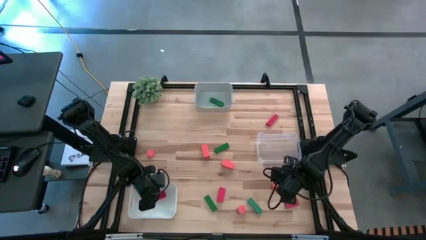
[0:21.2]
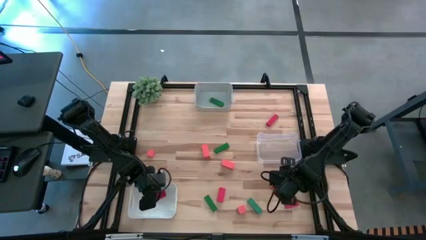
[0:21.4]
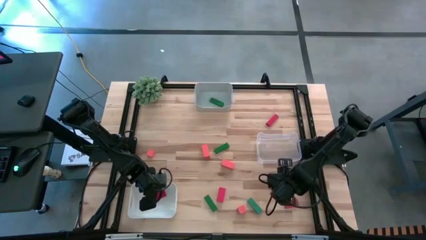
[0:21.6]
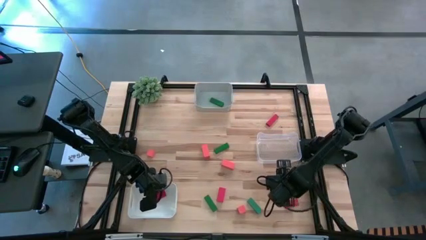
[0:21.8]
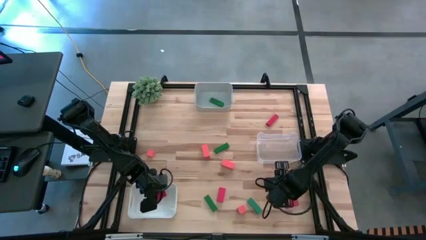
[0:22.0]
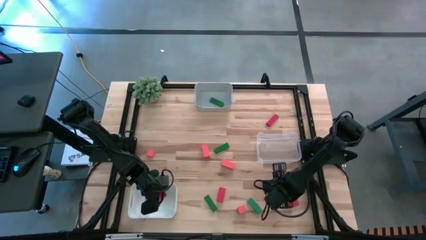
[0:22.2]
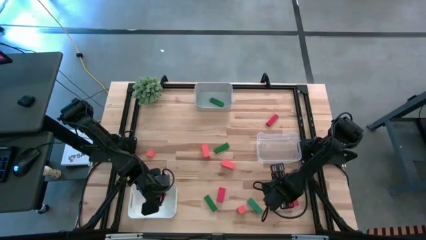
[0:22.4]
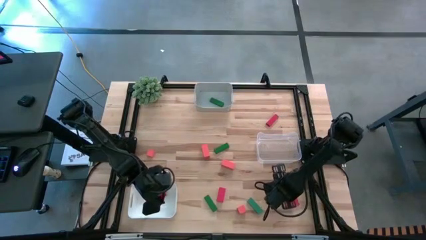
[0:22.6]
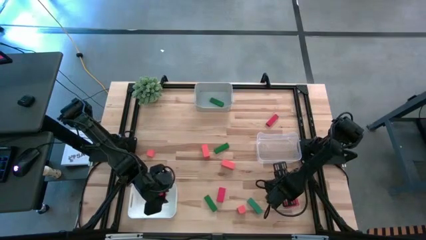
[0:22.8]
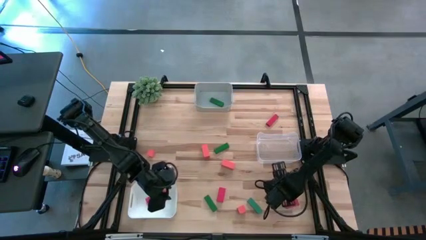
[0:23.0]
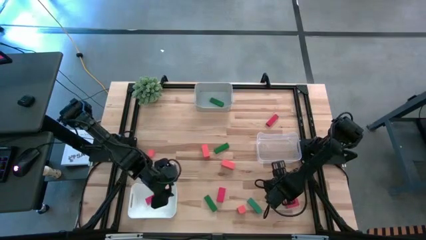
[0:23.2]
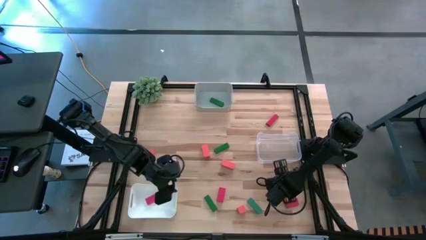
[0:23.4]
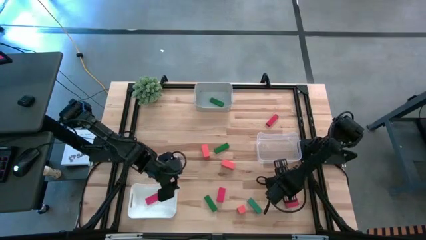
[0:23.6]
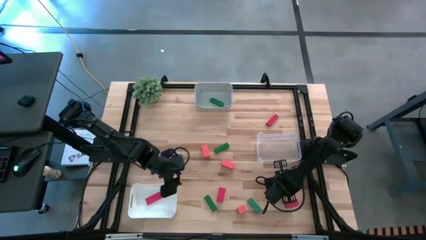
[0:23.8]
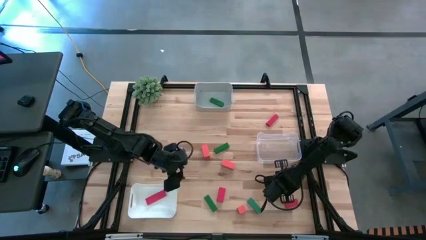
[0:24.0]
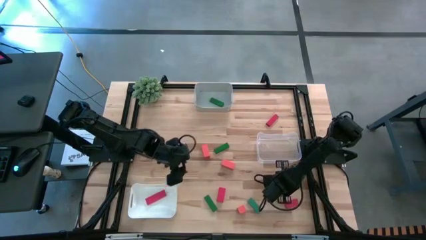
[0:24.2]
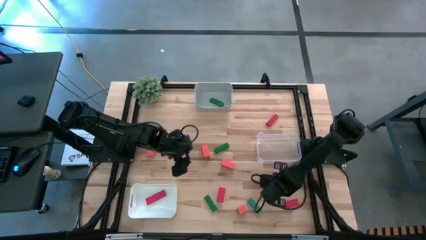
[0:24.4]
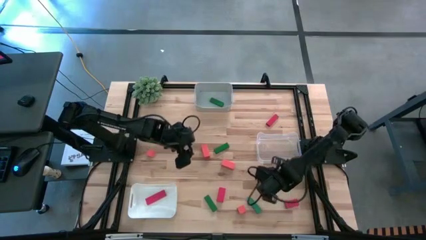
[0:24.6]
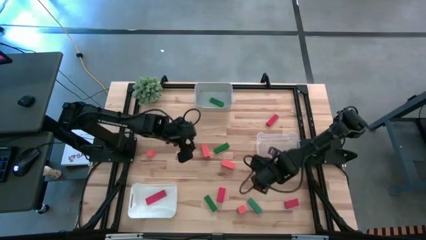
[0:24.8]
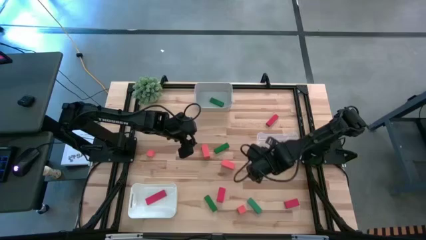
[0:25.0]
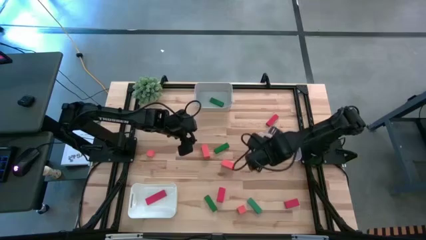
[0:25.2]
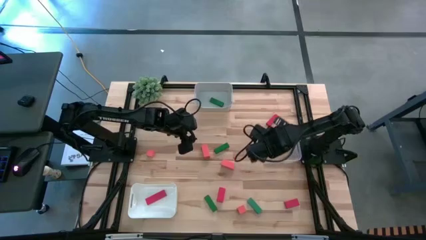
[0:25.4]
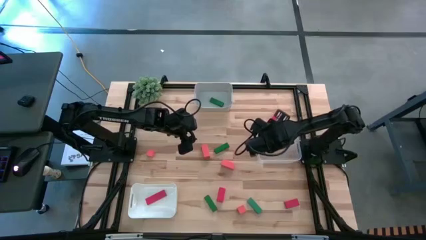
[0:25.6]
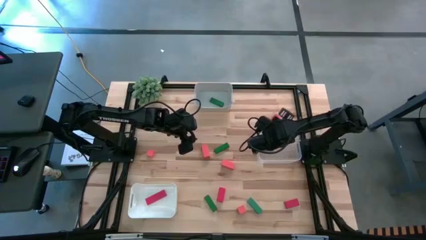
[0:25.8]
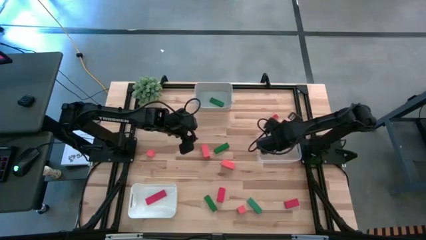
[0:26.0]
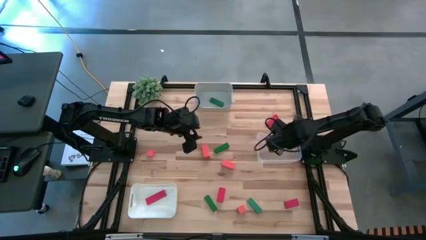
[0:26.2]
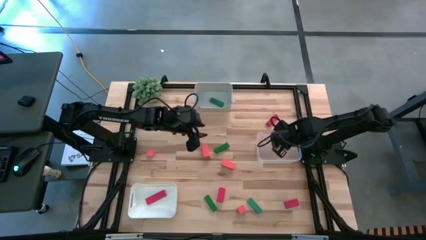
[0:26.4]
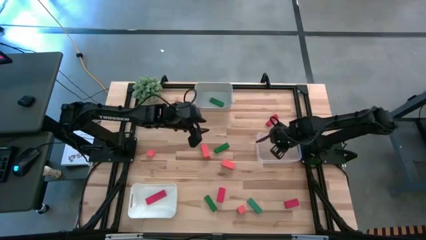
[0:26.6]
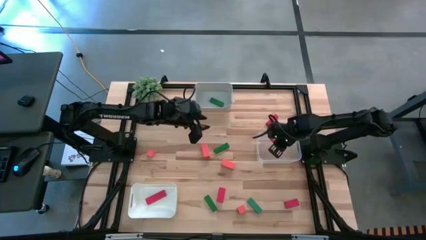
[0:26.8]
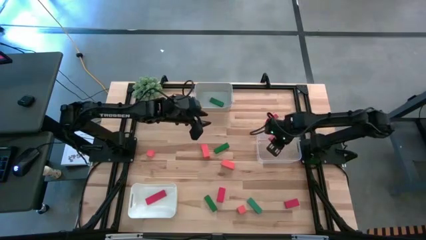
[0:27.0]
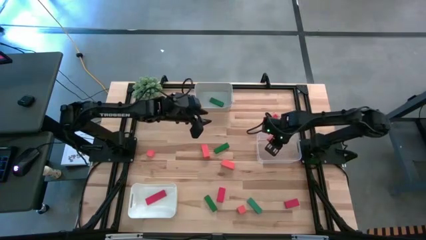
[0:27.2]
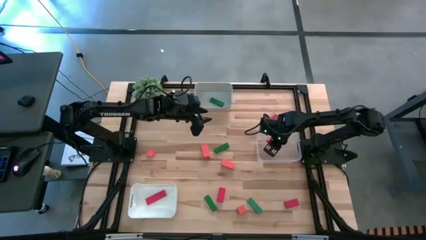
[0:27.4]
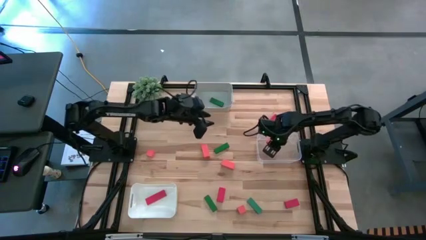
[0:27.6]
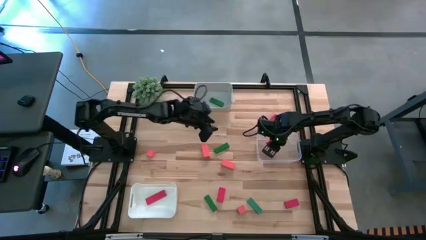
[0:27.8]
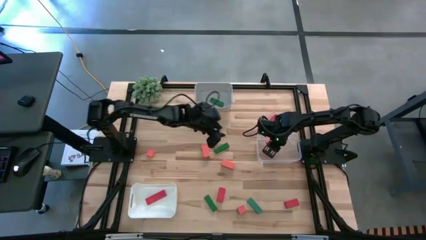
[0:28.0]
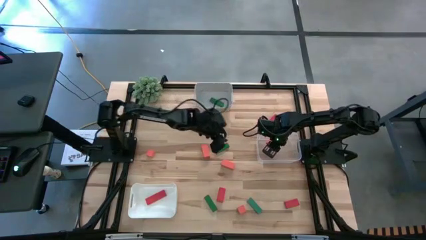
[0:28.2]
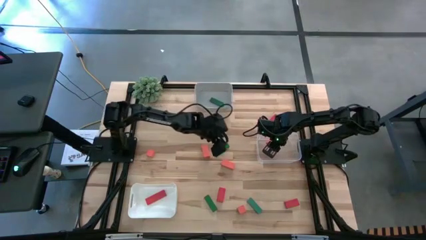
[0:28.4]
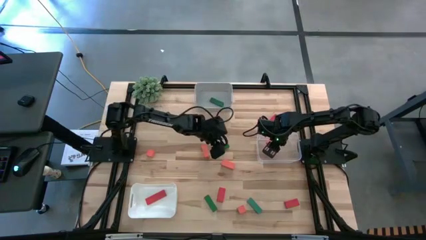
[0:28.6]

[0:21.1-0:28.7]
Task: Sort & place blocks by color
Put the orange block into the transparent bin

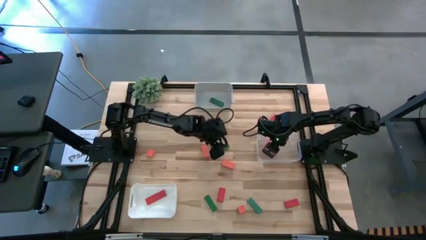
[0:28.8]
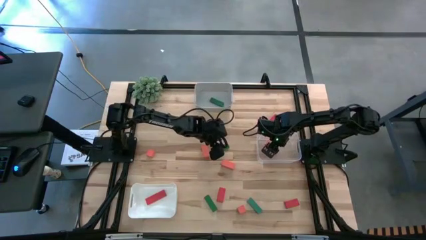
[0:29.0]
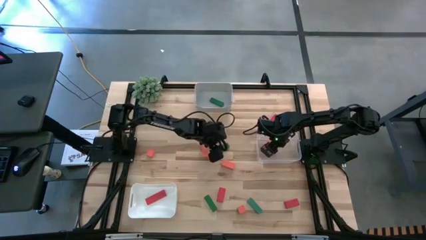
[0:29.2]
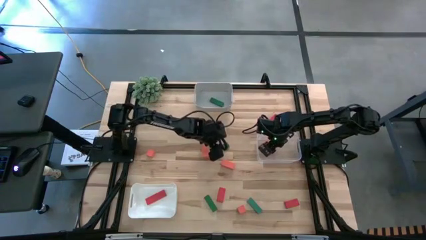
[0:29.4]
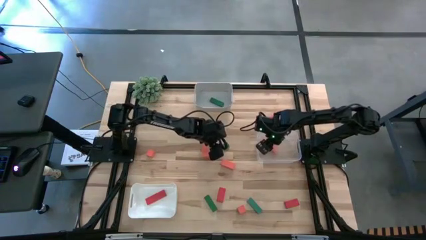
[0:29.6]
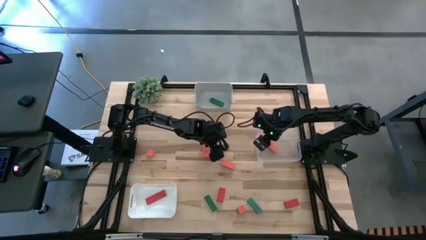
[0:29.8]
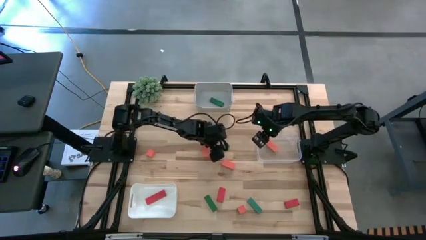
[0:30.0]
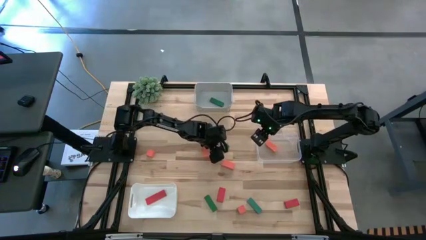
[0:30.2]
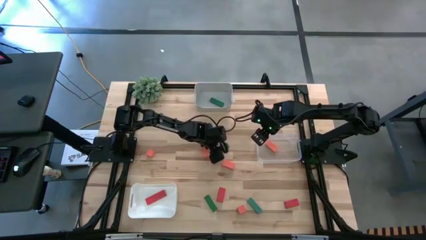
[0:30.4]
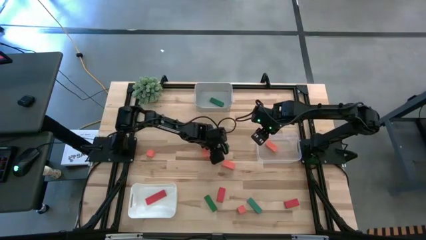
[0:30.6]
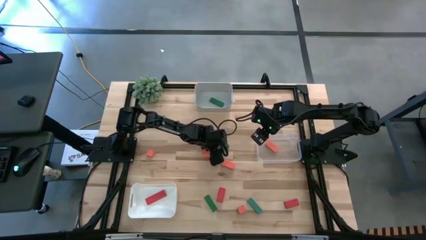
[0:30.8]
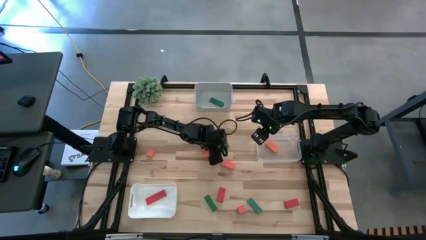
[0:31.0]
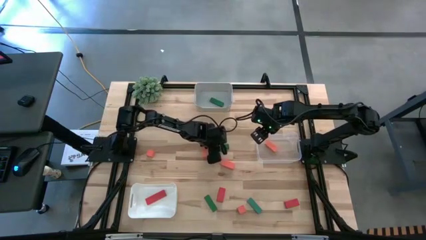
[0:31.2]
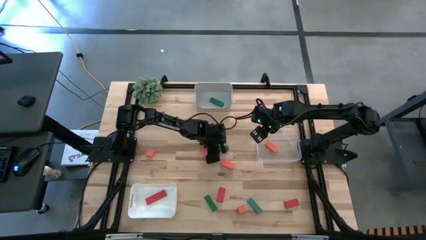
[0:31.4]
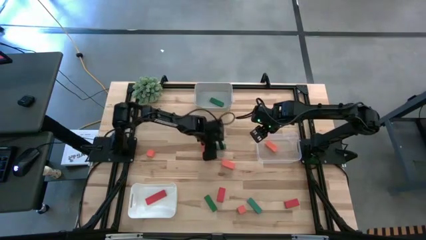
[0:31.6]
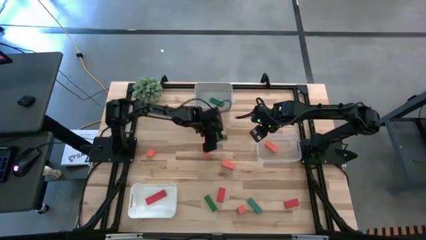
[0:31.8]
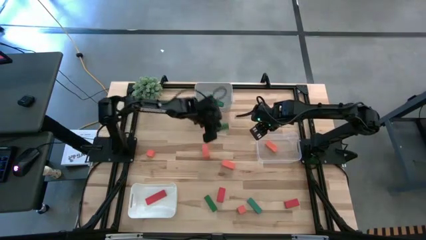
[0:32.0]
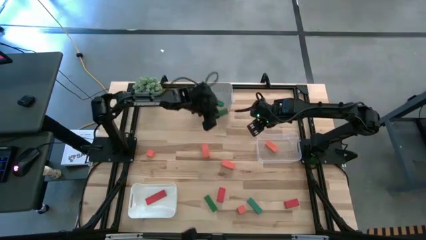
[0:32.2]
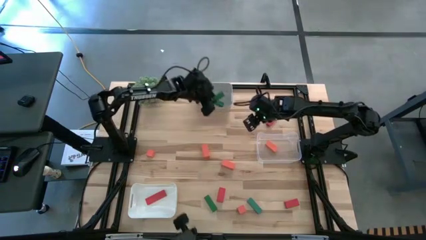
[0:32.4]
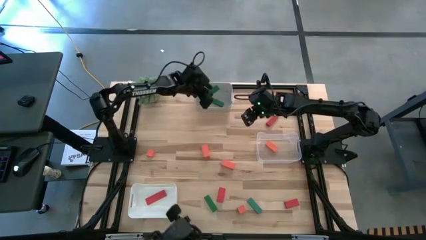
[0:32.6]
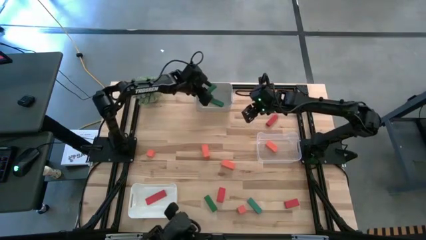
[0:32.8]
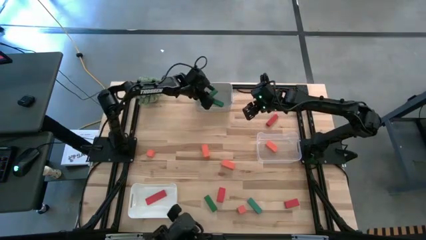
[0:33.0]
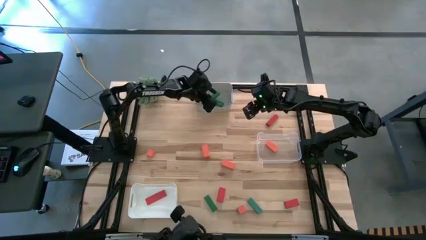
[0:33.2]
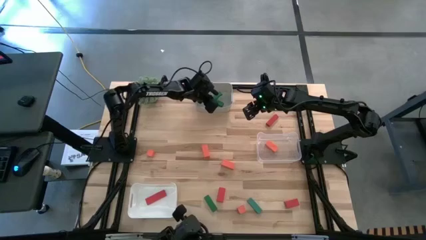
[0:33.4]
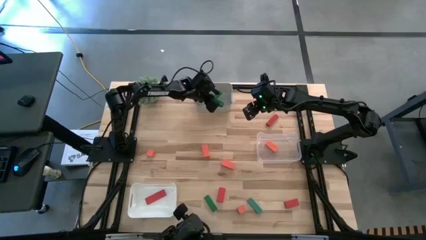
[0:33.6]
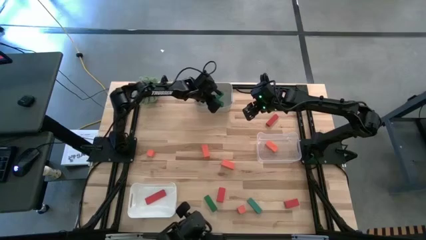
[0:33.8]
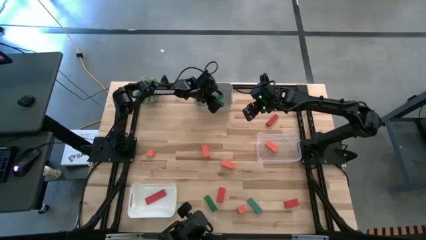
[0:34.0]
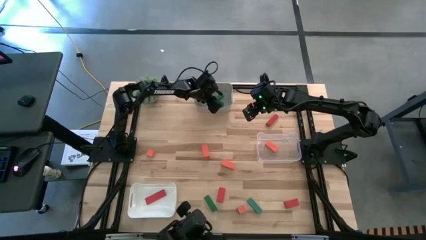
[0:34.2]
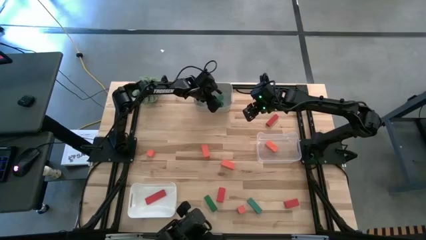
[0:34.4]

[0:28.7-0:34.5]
Put the green block into the gray bin

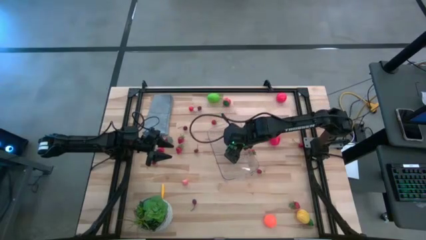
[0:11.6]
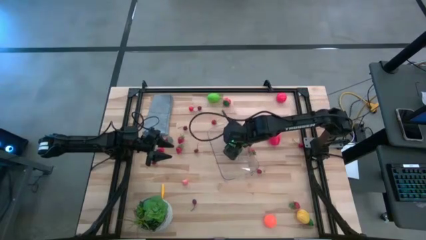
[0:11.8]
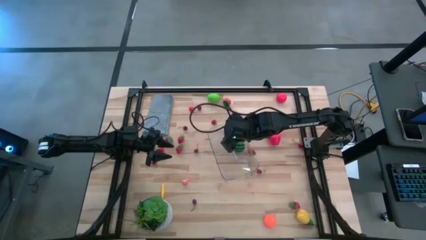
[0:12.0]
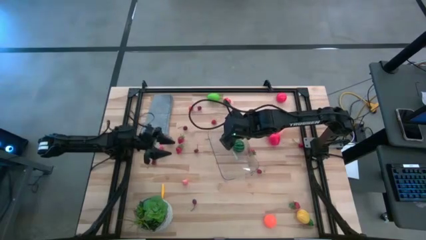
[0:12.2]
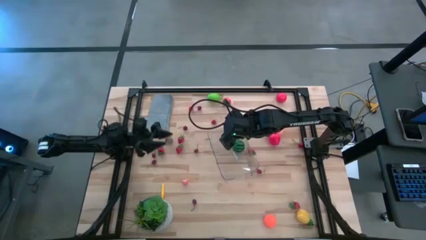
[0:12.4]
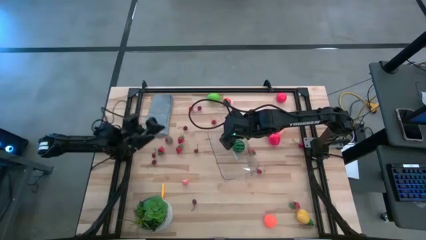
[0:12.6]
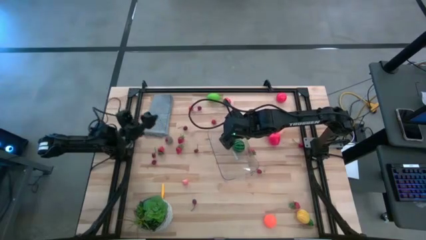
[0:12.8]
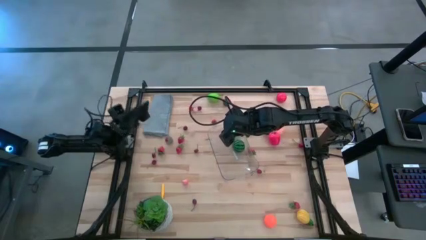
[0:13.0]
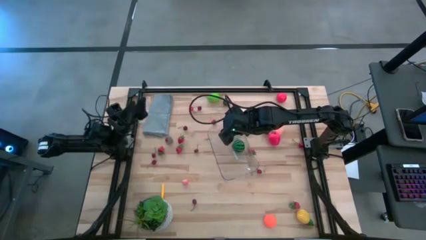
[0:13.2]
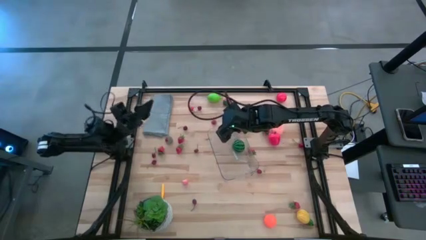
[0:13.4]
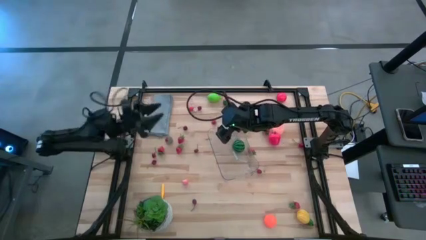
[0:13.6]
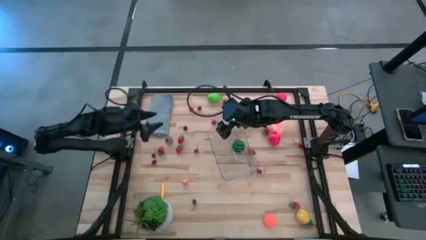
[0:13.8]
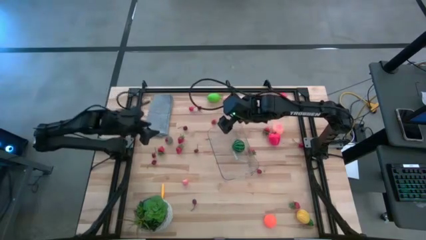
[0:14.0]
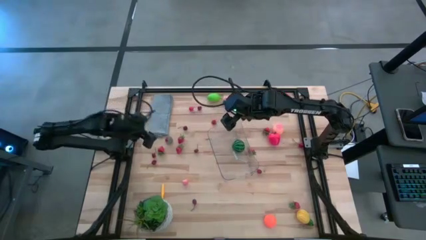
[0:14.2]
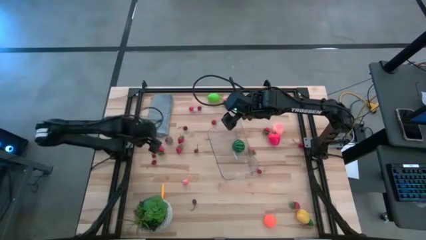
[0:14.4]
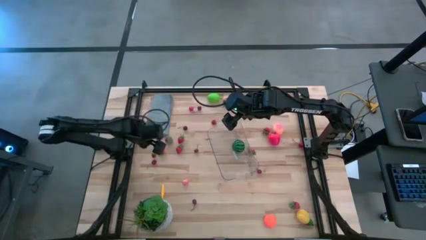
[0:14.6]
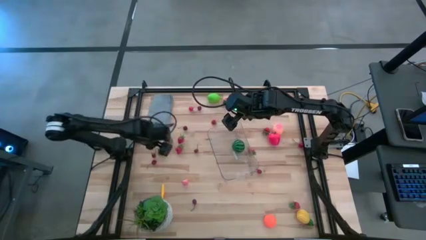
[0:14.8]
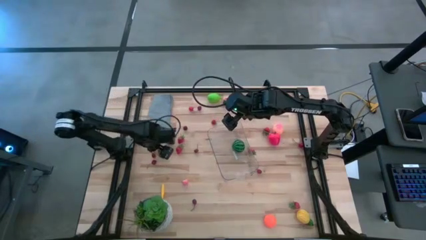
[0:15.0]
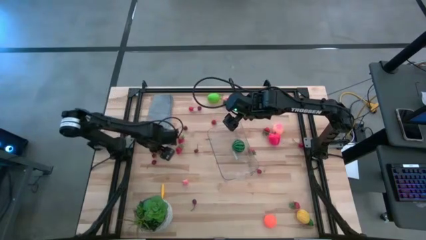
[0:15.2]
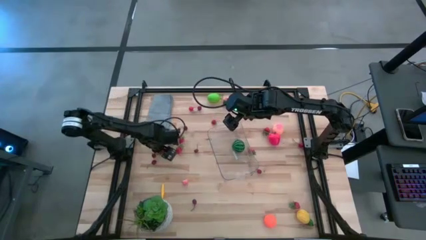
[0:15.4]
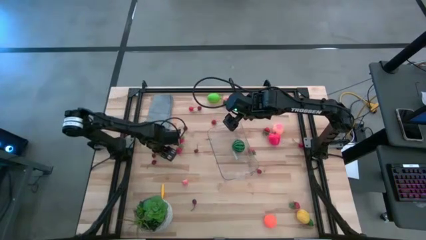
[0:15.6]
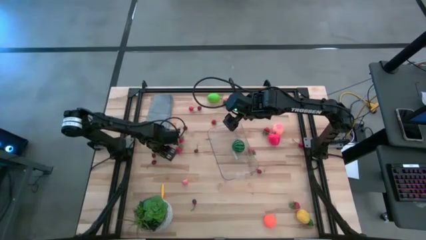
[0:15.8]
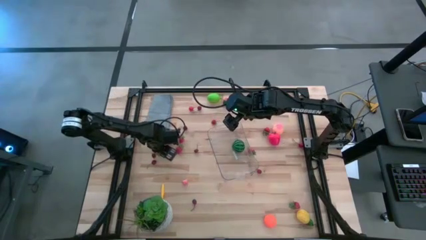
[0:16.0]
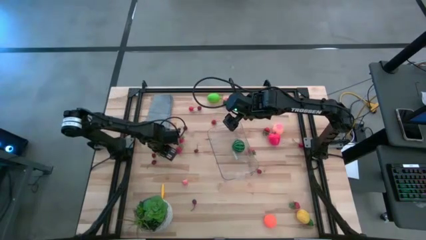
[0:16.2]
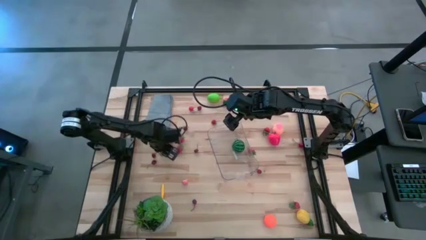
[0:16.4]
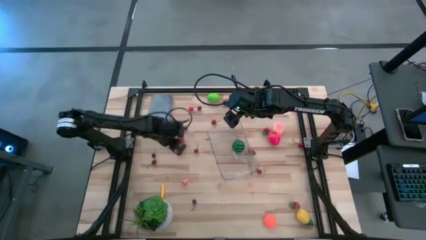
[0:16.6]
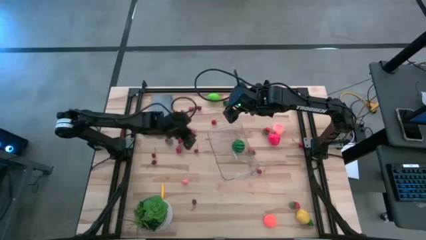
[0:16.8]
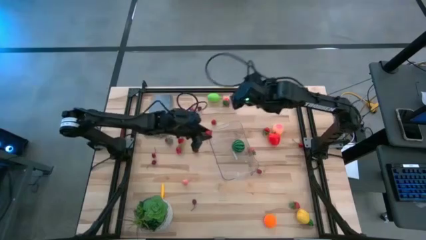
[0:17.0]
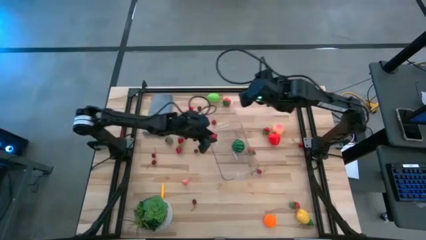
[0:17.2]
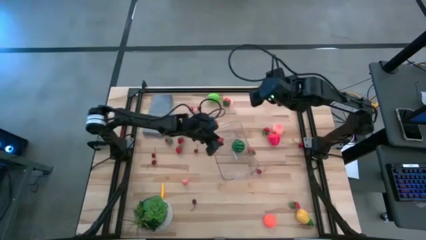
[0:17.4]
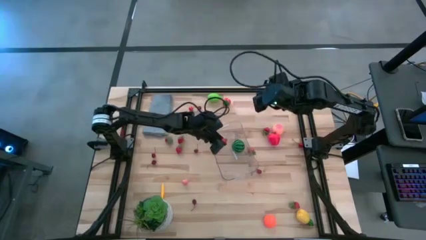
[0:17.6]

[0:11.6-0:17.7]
Task: Pick and placing Produce into tupperware
Put the red strawberry into the transparent bin
